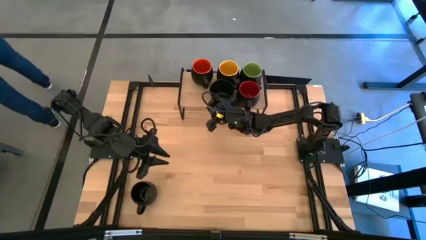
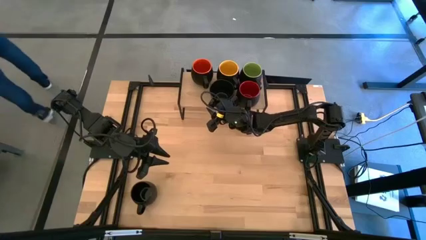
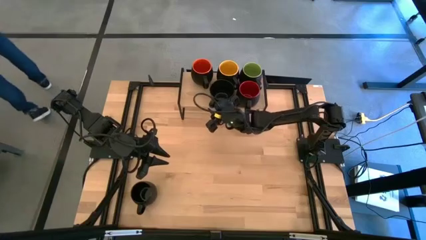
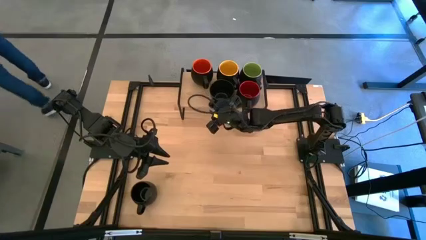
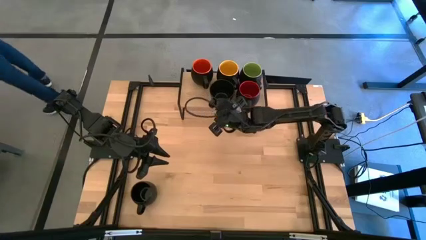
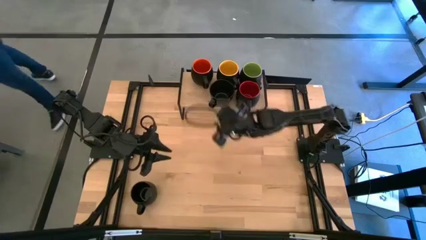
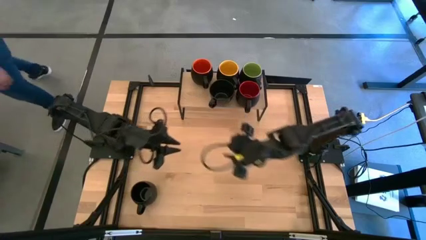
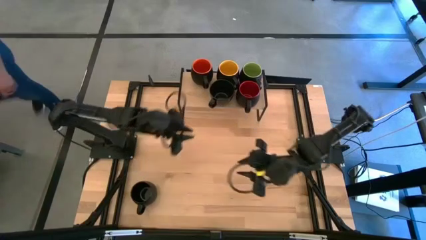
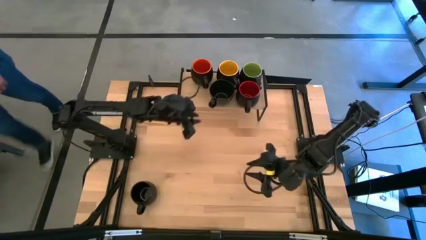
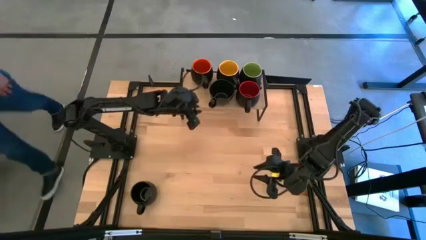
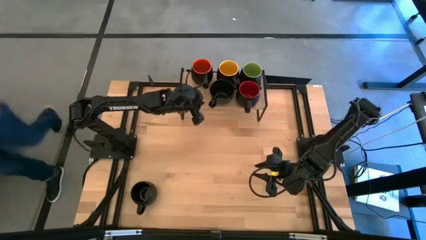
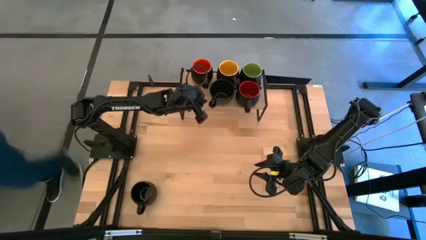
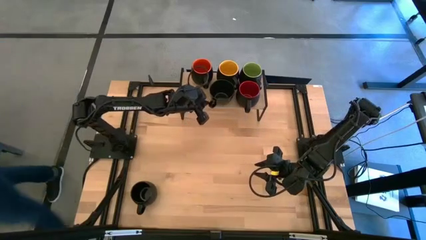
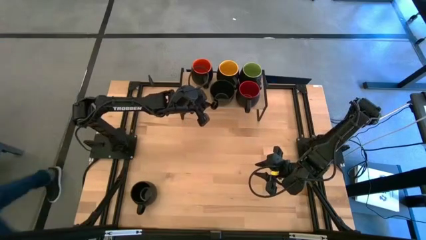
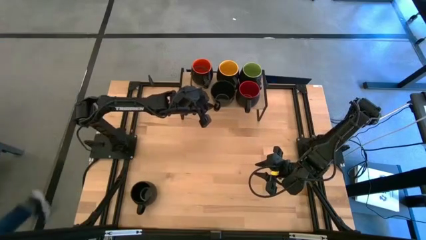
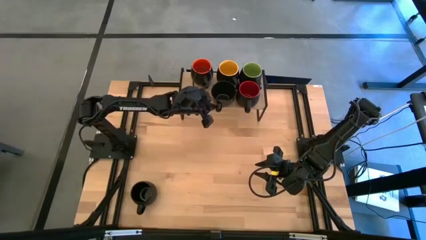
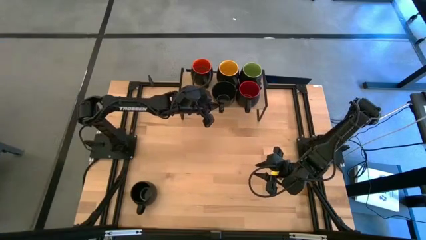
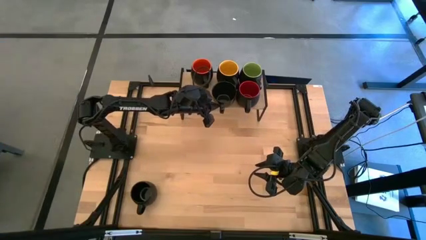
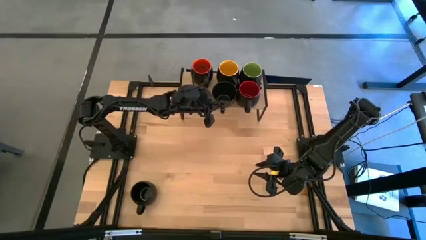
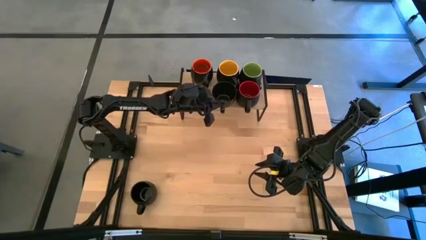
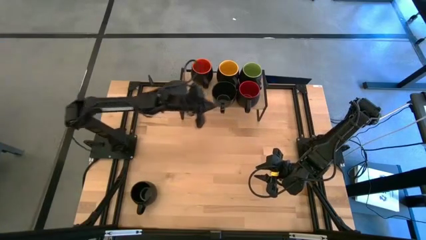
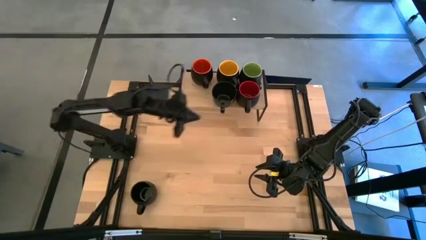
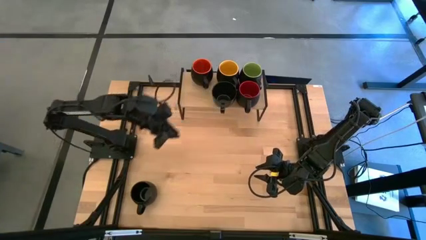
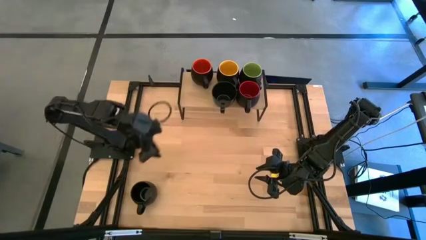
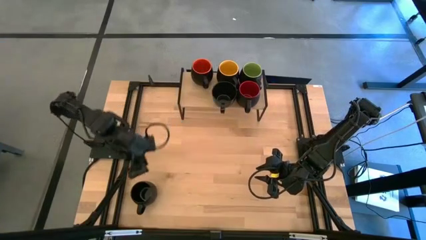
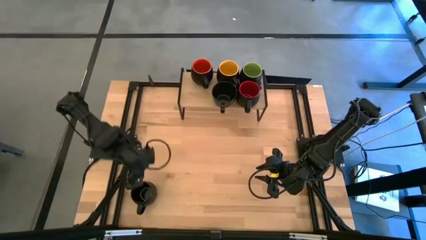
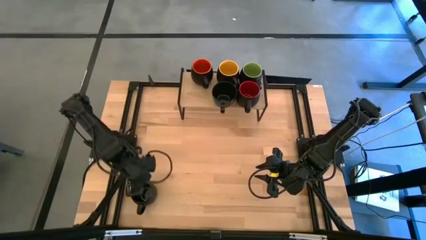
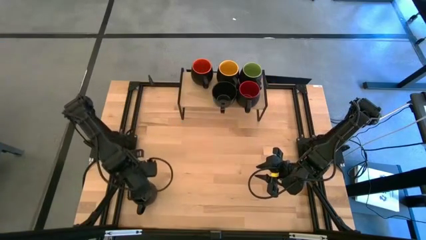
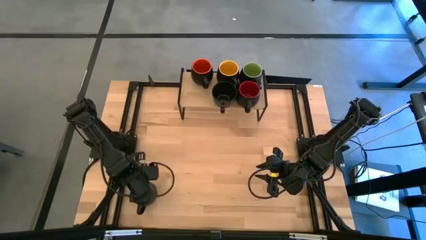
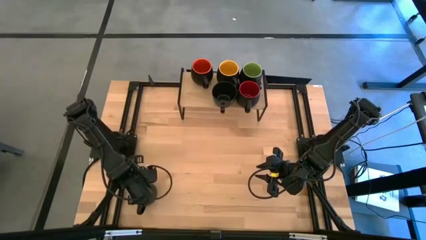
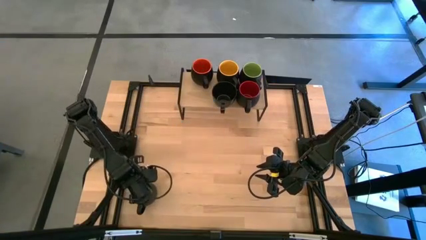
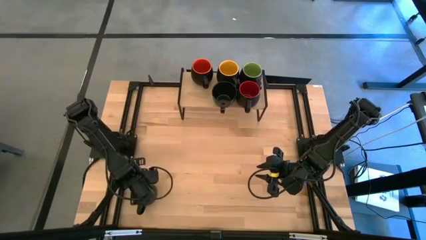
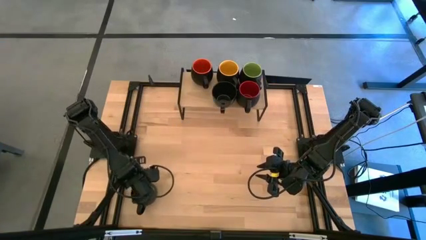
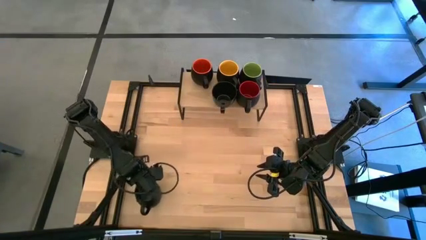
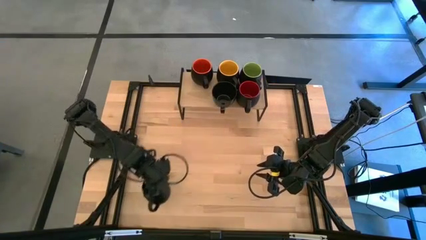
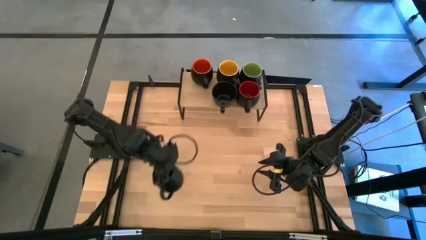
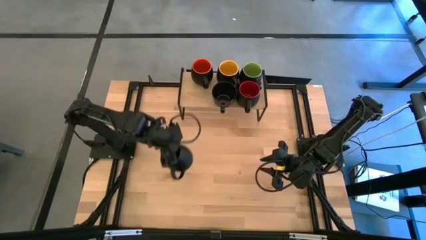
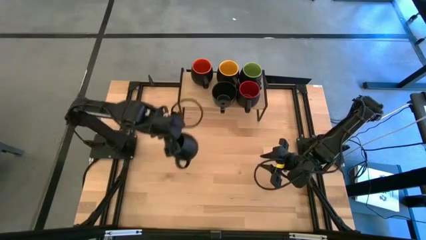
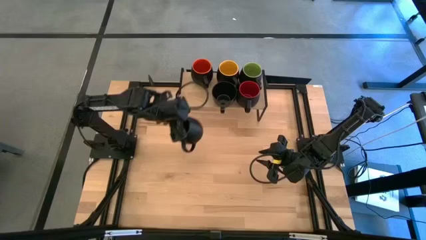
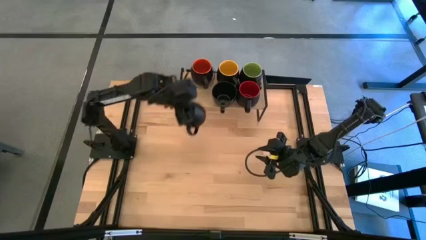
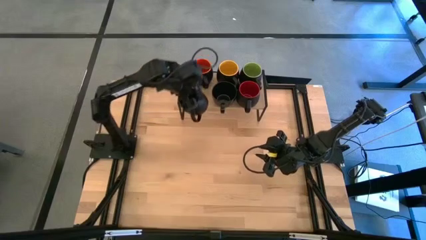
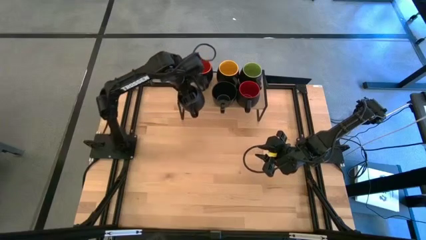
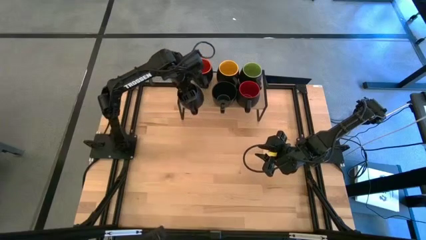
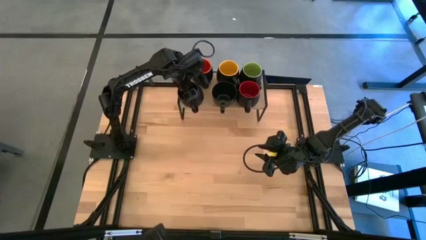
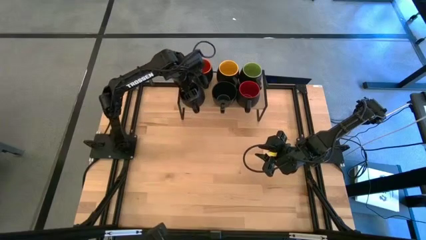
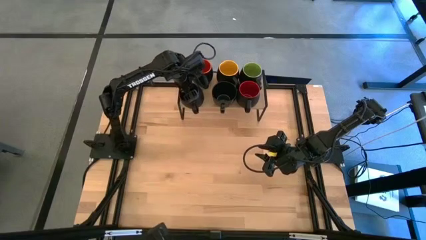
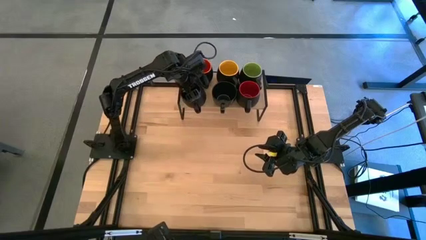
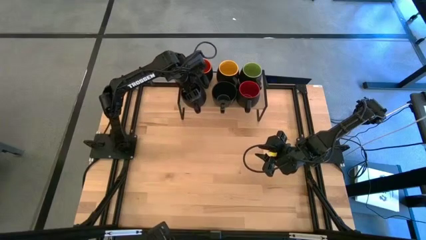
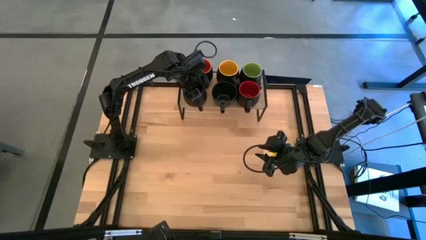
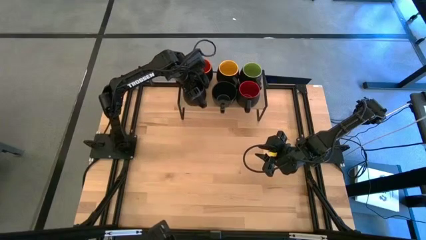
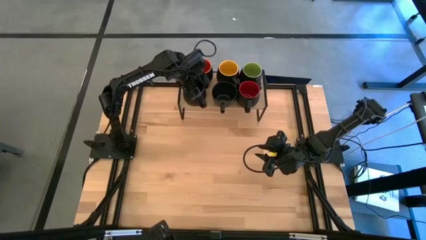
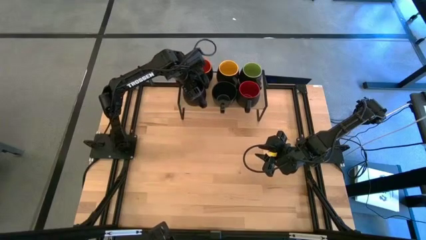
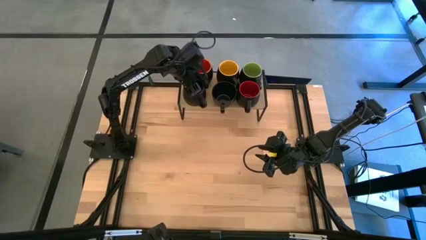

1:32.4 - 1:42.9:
Task: Place coffee mugs
Put the black mug on the shelf

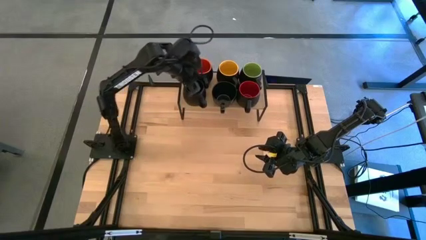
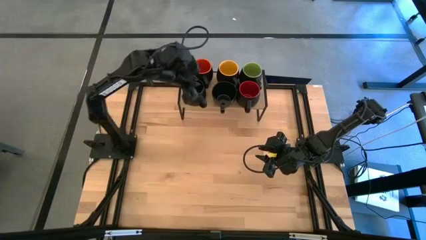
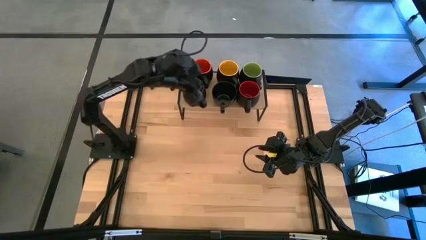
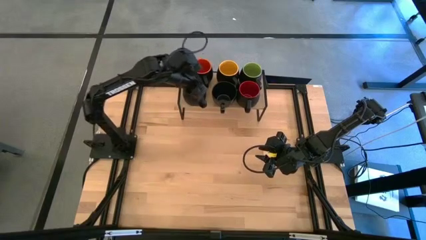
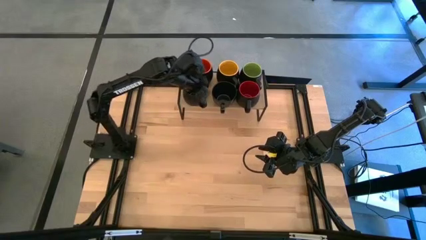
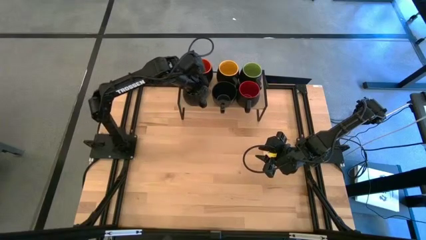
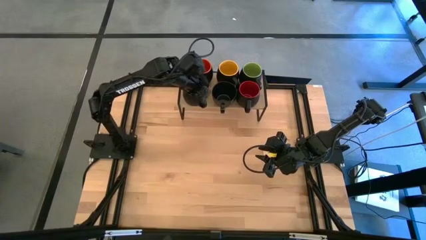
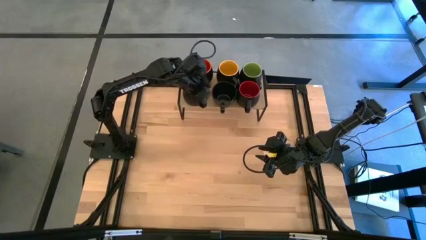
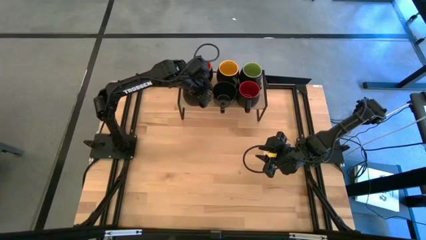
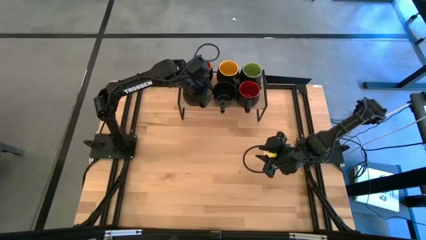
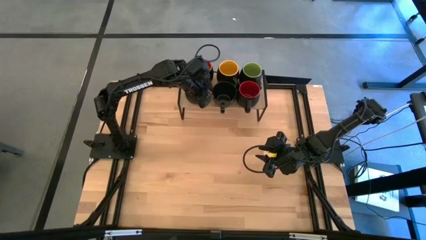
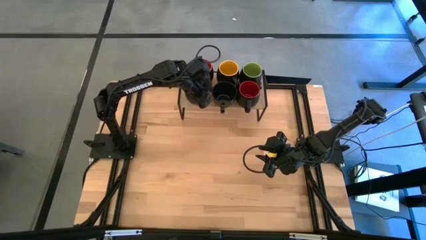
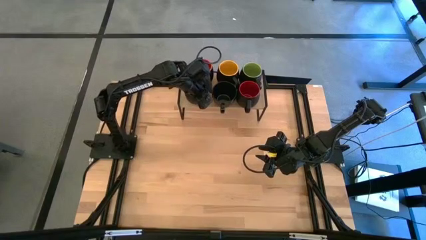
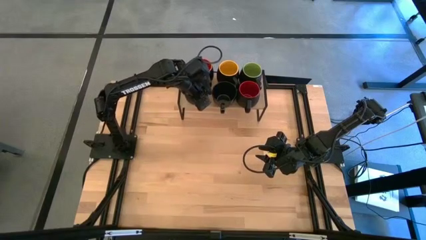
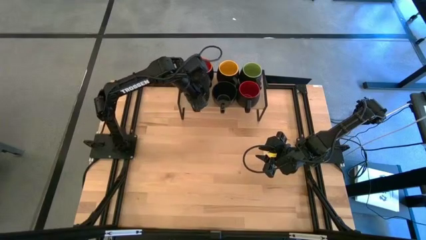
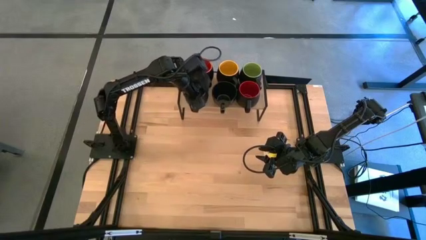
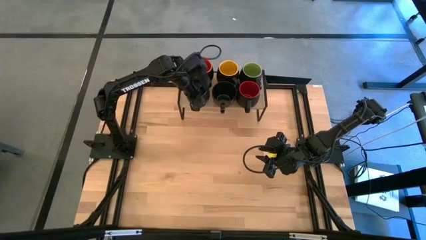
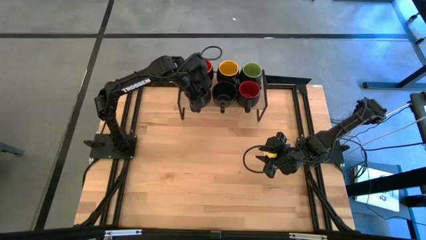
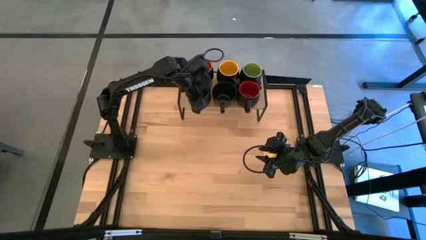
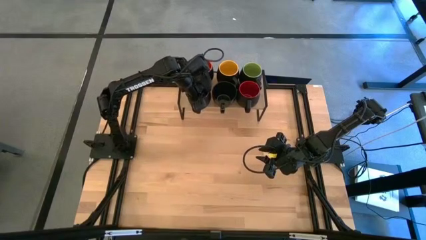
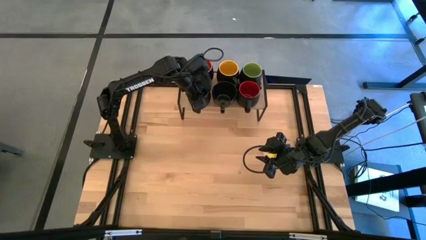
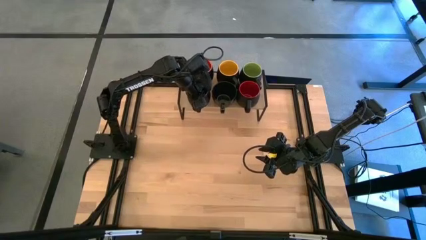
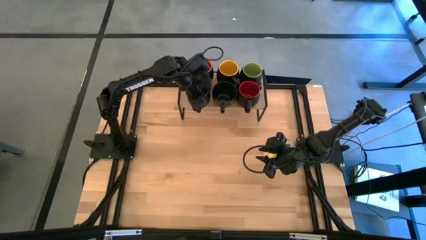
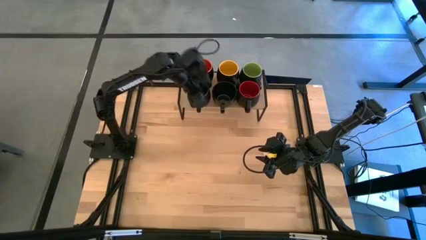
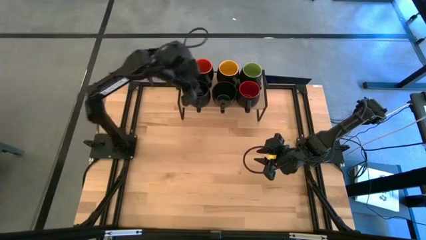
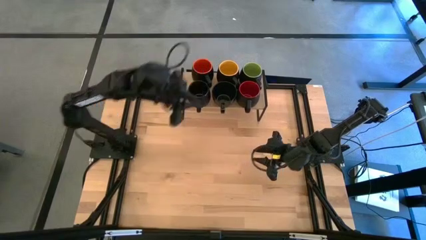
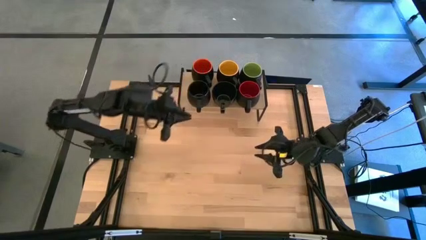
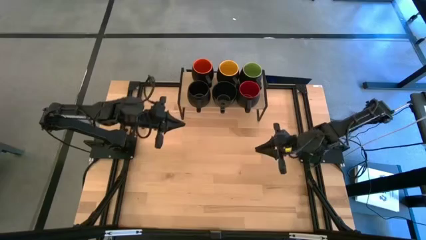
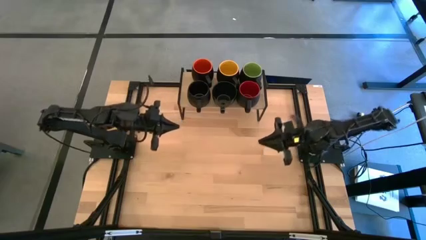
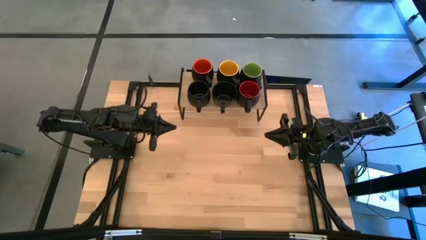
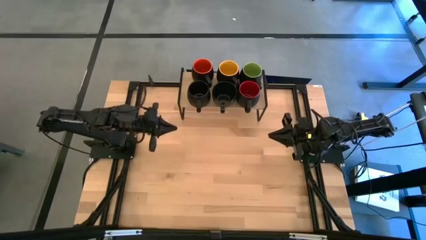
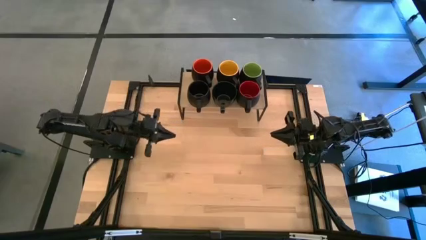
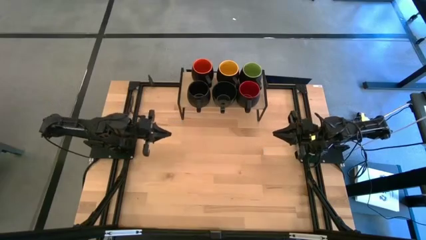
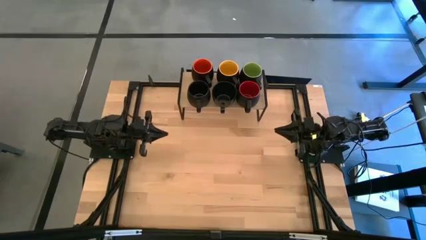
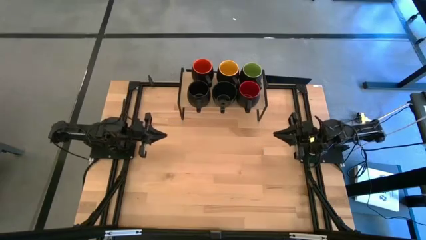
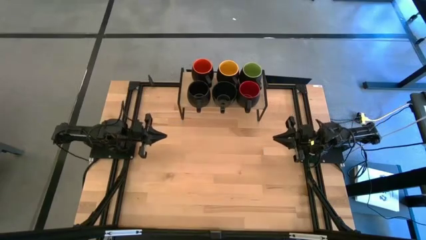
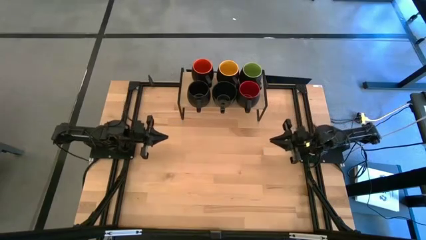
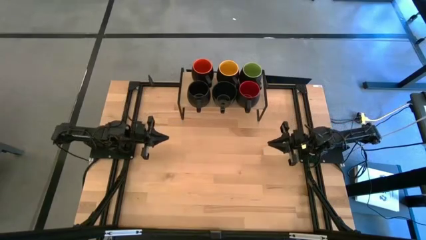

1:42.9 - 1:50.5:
Return to Home Position
